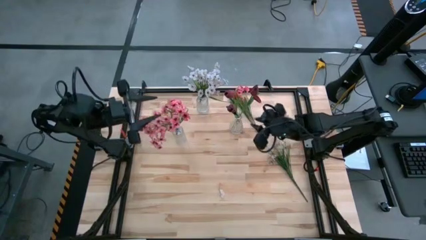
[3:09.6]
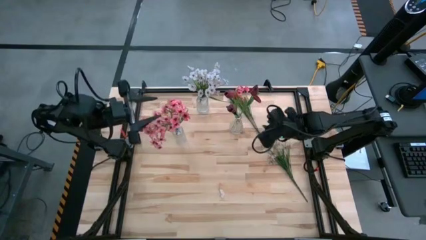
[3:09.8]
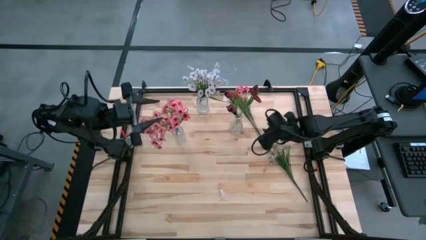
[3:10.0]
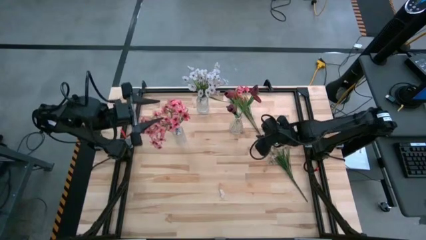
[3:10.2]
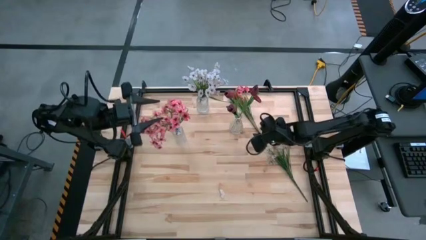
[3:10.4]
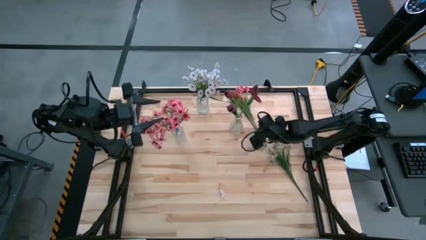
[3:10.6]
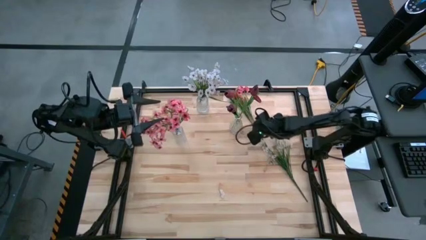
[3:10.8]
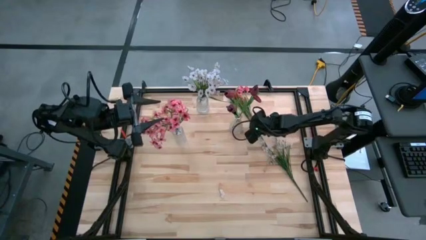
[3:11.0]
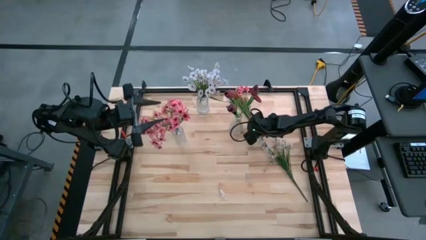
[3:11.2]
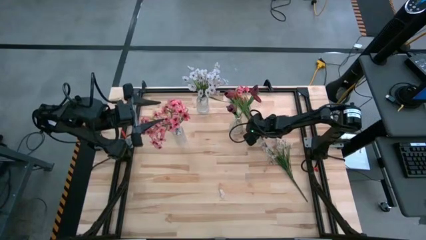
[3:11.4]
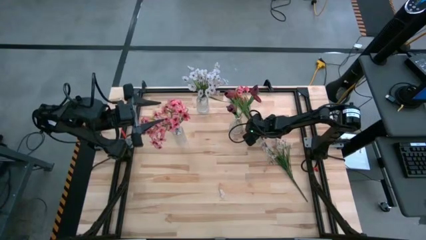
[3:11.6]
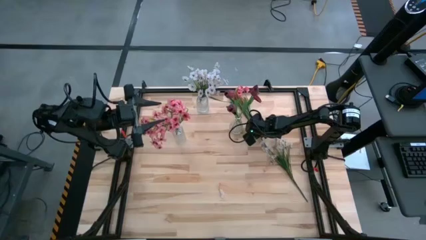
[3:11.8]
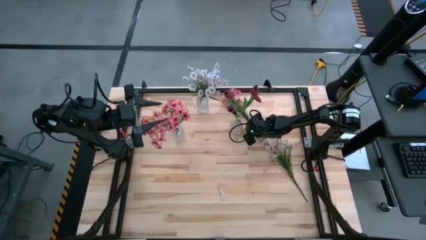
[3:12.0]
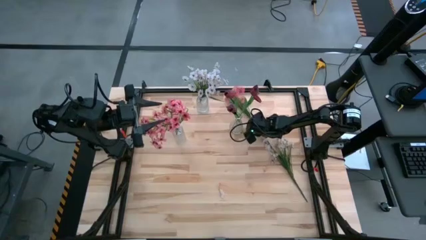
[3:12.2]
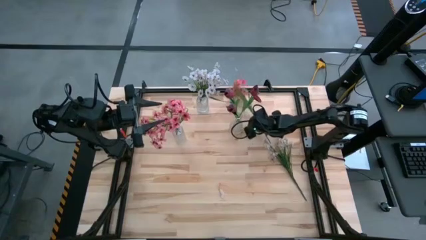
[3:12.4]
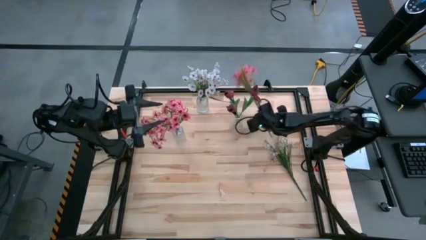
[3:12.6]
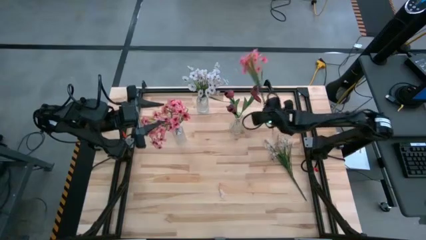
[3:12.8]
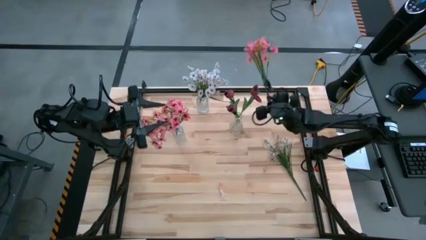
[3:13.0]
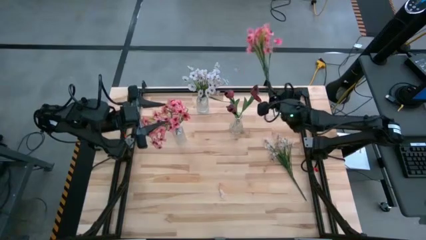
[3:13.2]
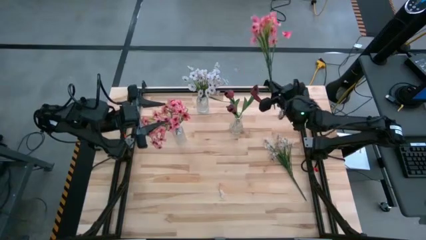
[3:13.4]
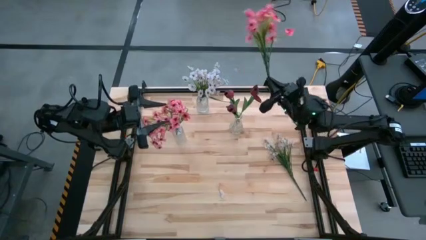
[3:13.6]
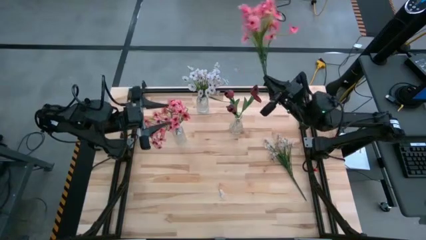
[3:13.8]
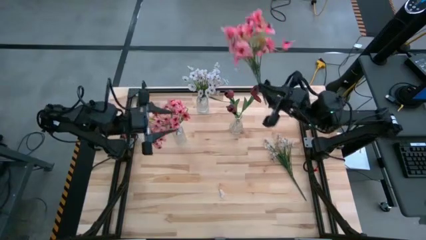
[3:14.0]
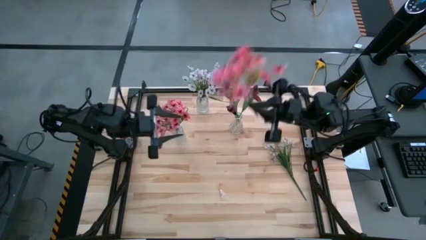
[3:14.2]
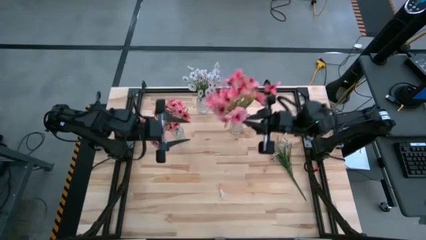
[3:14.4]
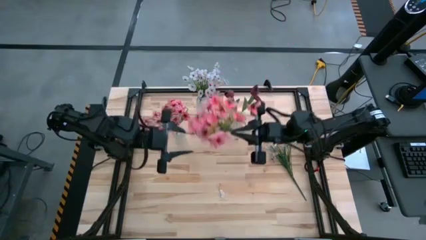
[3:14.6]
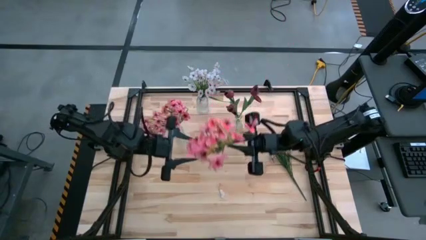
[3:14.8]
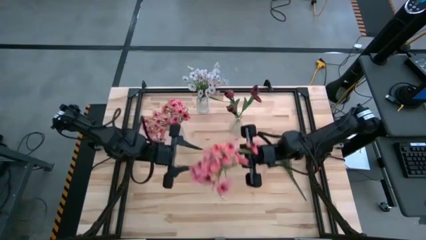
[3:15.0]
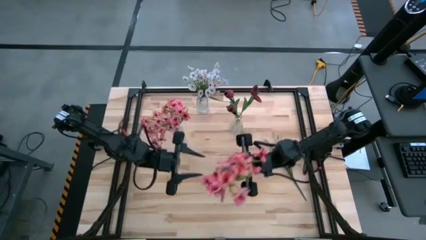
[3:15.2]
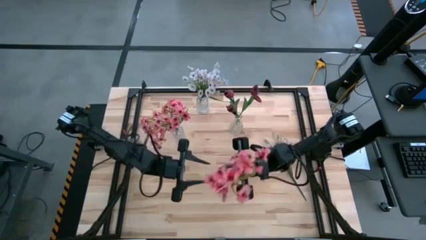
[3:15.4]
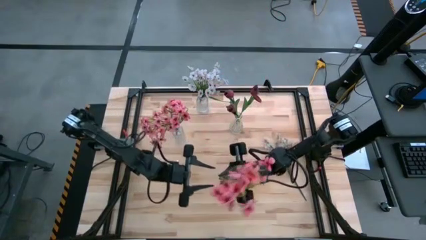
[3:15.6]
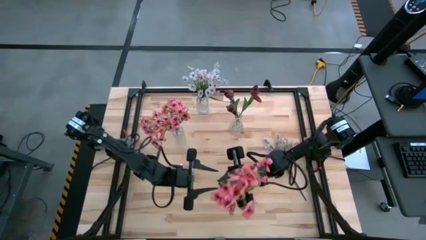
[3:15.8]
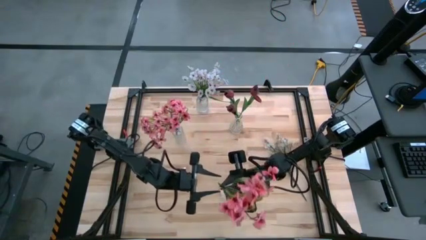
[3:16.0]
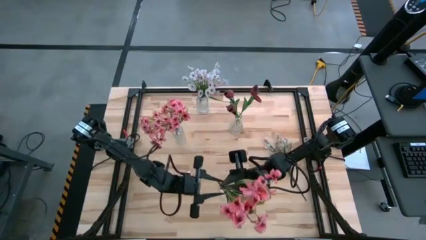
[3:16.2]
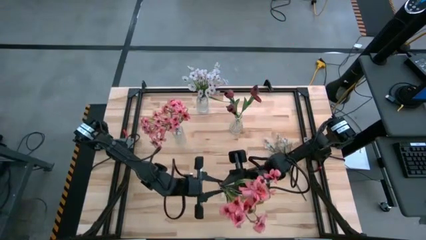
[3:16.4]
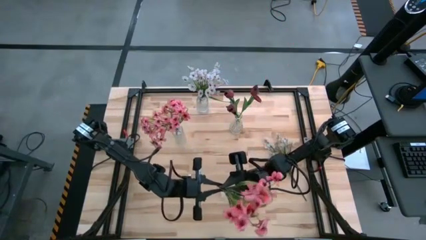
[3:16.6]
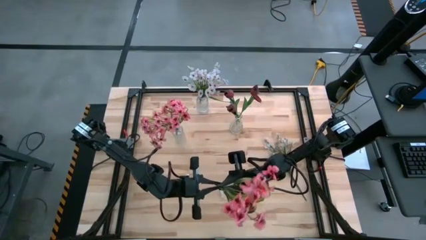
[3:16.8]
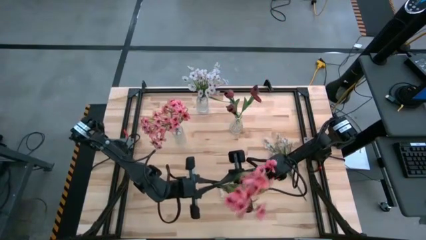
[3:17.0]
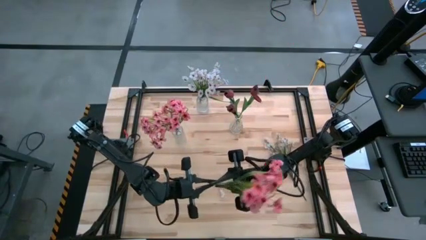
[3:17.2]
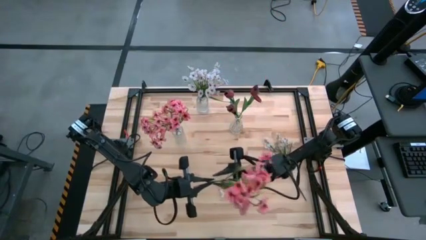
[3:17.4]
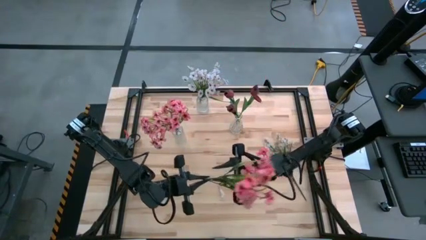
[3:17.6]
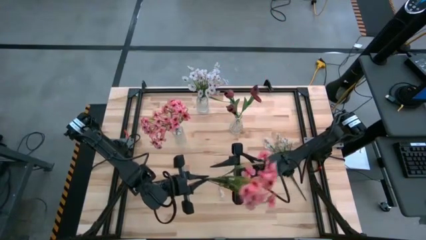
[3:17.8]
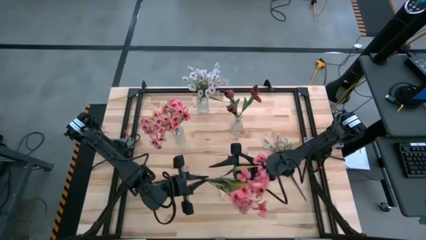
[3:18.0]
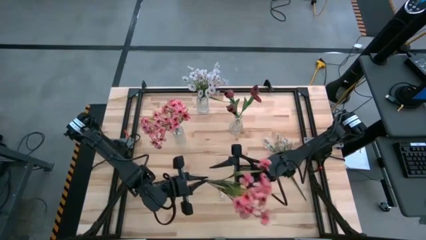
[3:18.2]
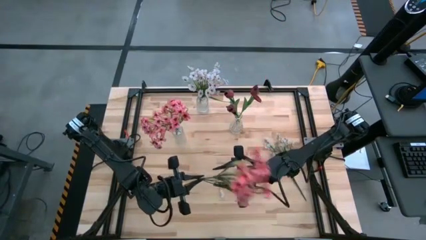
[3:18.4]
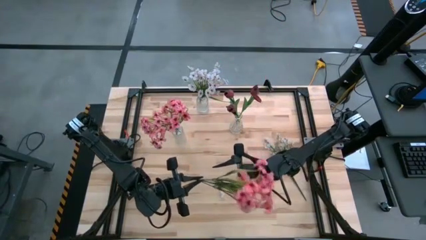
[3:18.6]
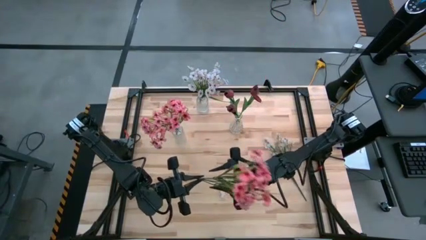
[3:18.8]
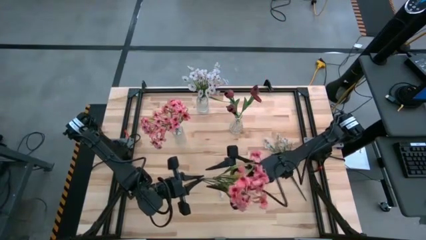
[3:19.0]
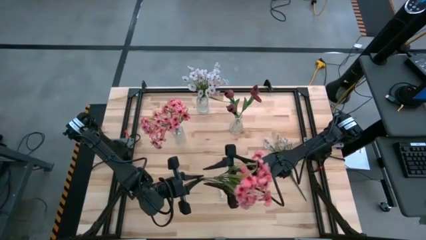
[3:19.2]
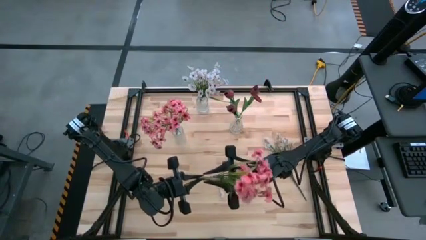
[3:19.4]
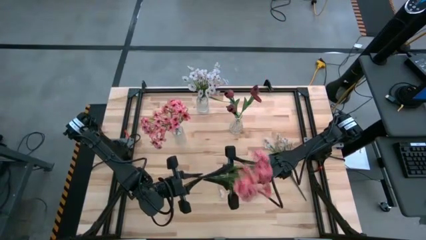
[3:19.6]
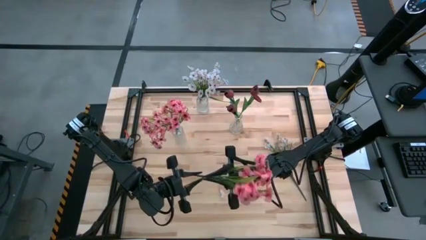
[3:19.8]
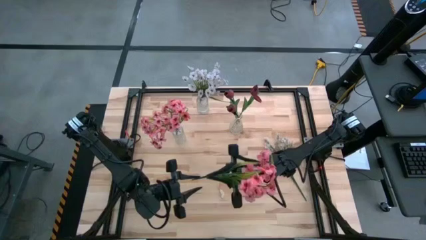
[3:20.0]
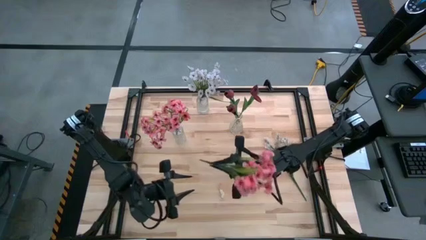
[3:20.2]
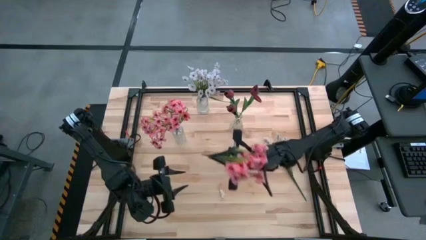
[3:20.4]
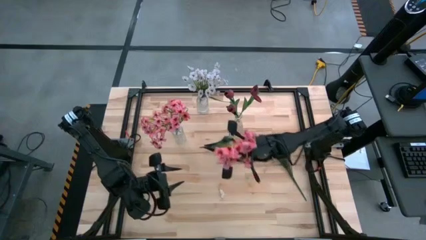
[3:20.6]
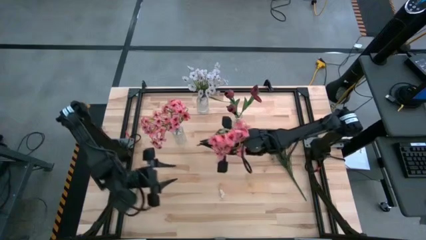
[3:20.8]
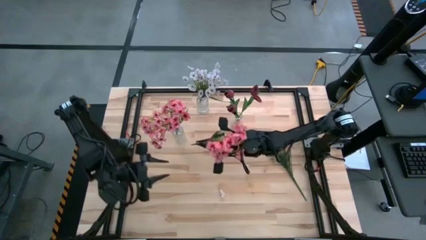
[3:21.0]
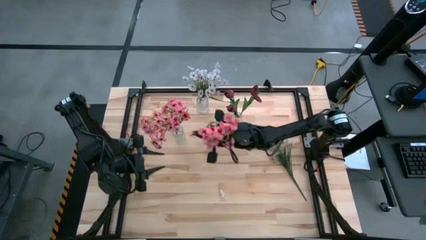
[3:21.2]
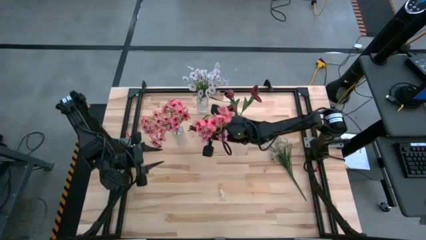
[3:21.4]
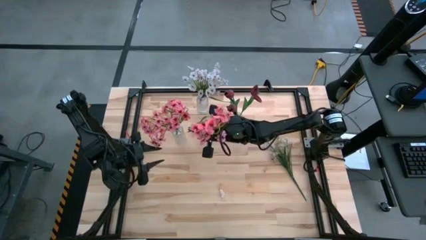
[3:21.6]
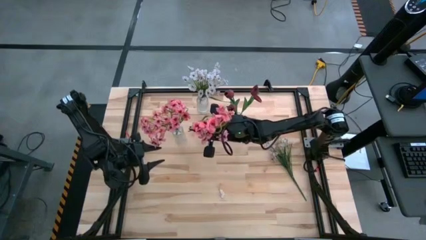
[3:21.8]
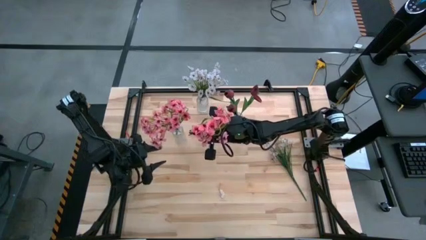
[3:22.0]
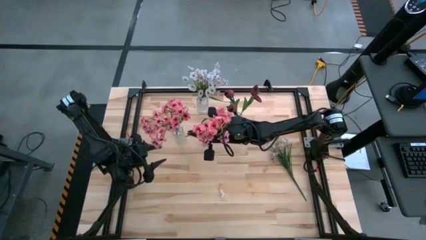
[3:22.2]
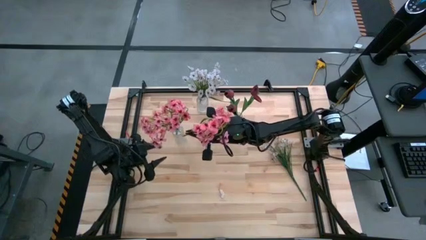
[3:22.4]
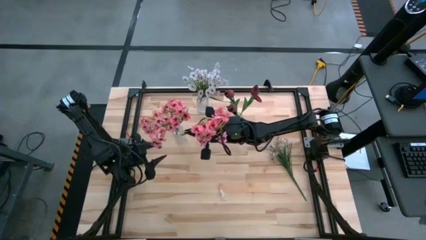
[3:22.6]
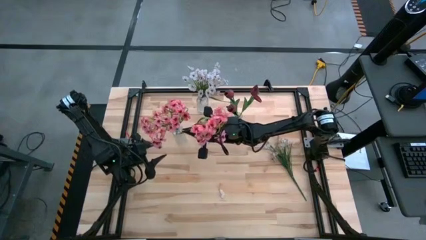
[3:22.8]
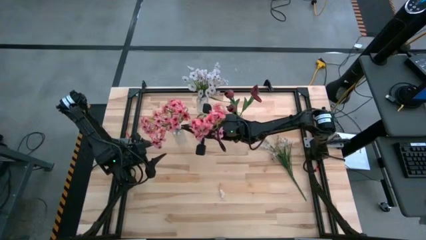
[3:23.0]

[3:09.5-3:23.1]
Task: Sort flowers into vase by color
Put the pink flower into the bottom left transparent vase
